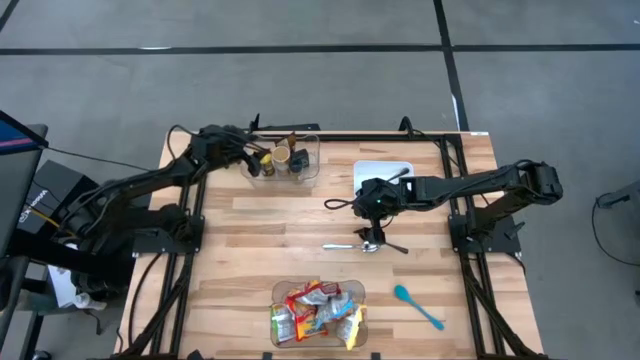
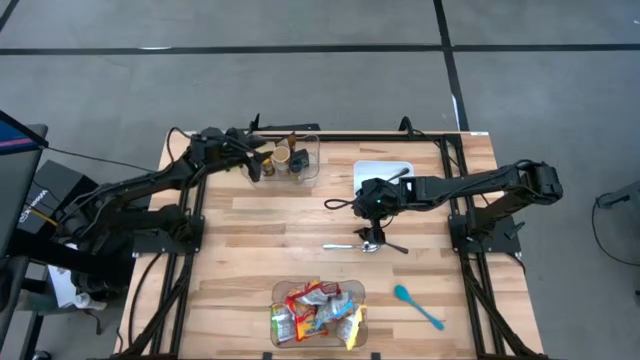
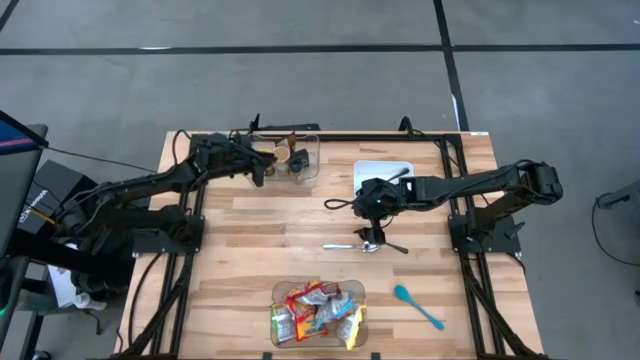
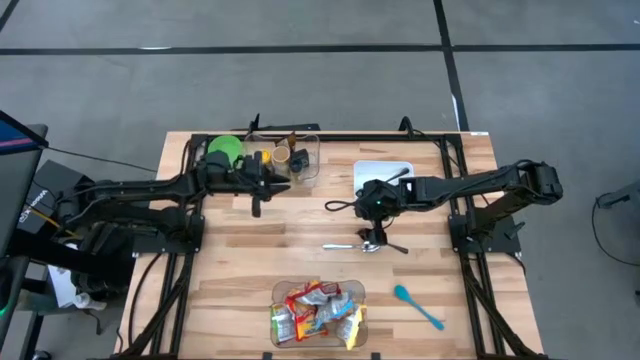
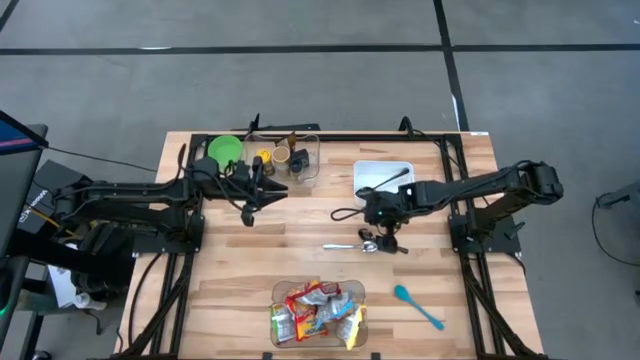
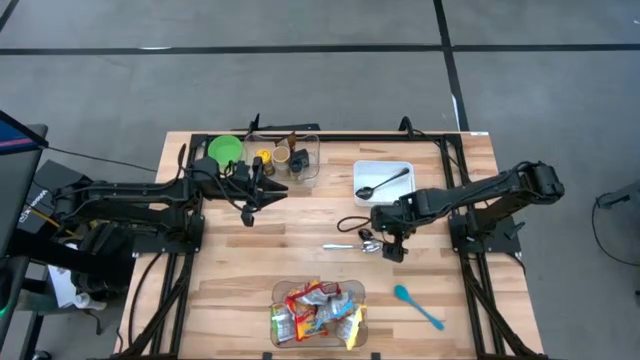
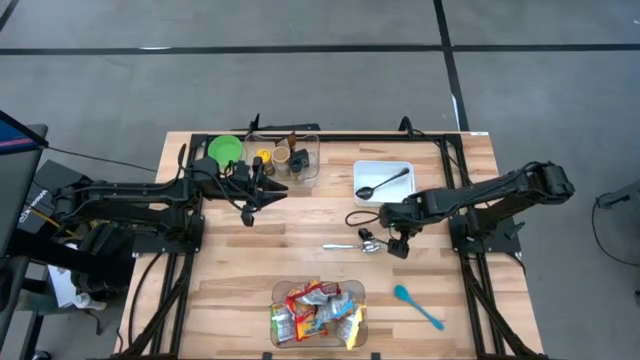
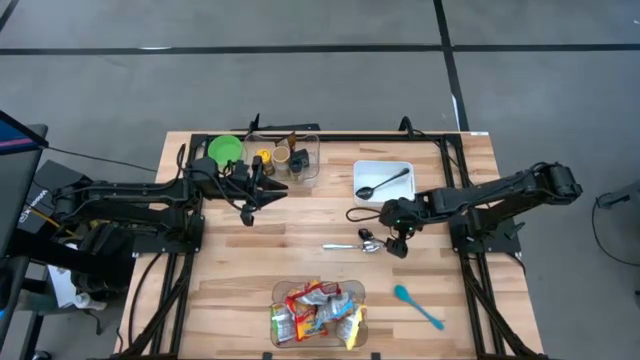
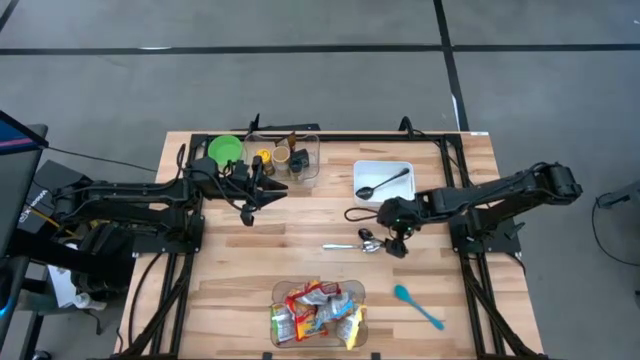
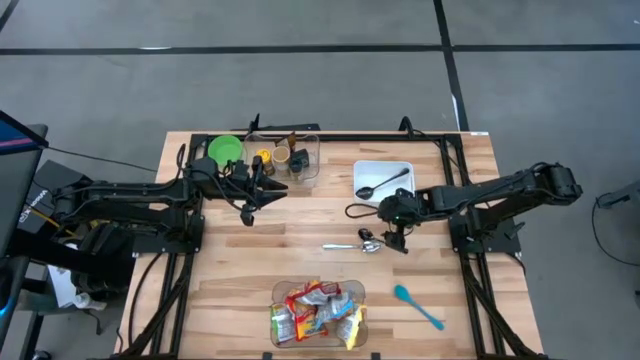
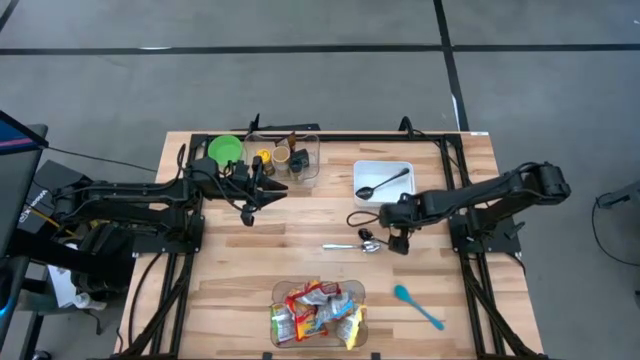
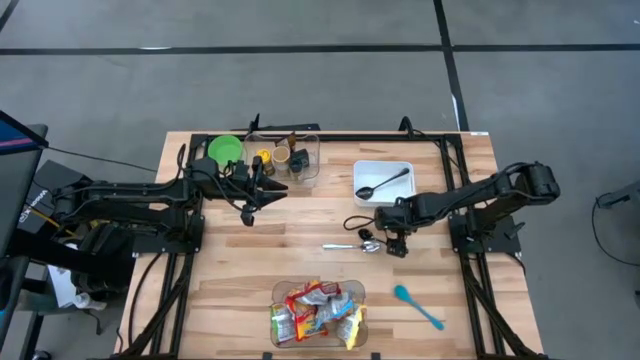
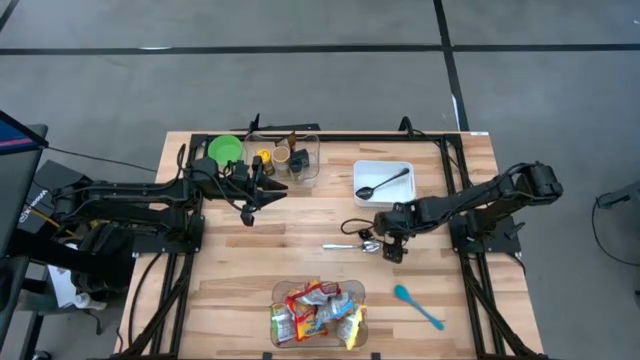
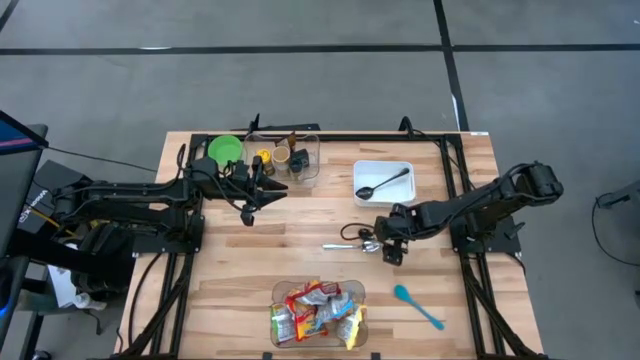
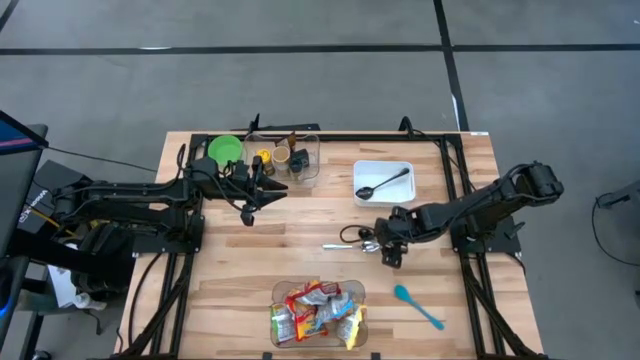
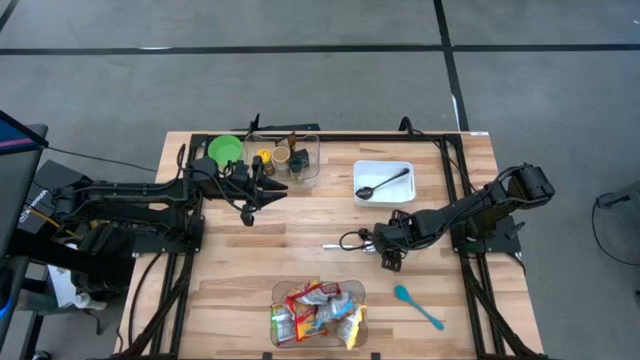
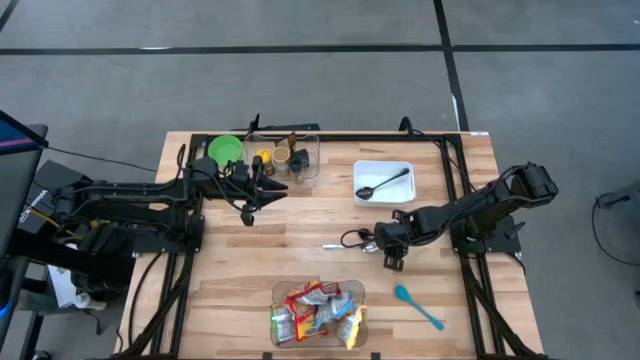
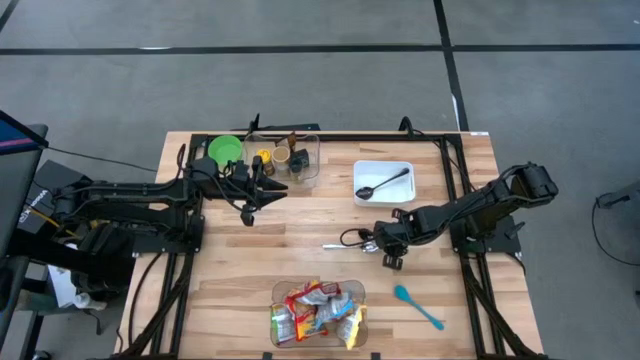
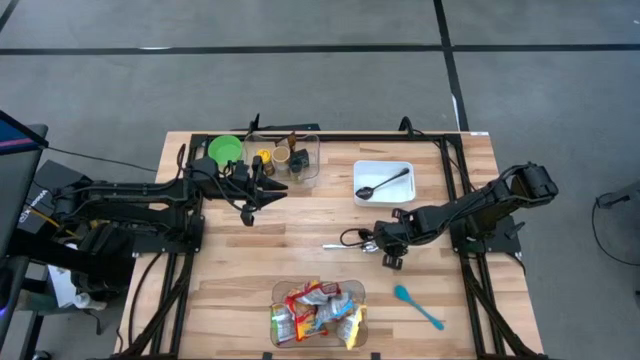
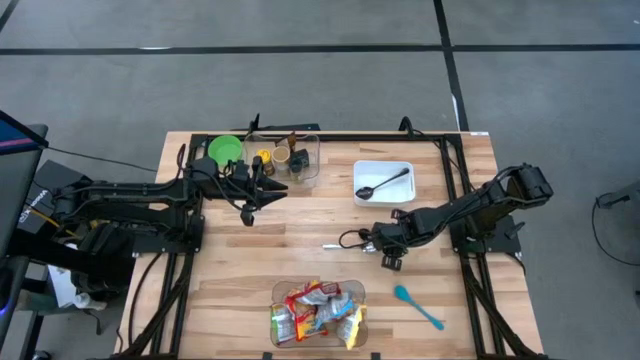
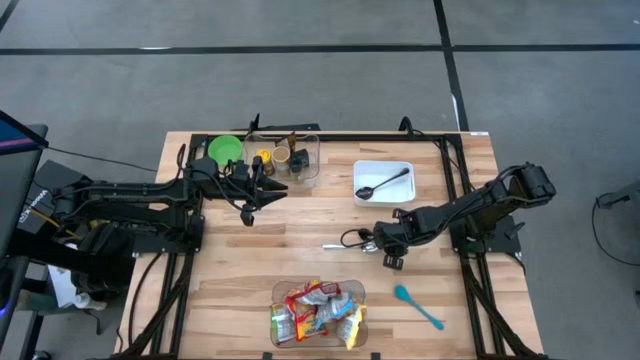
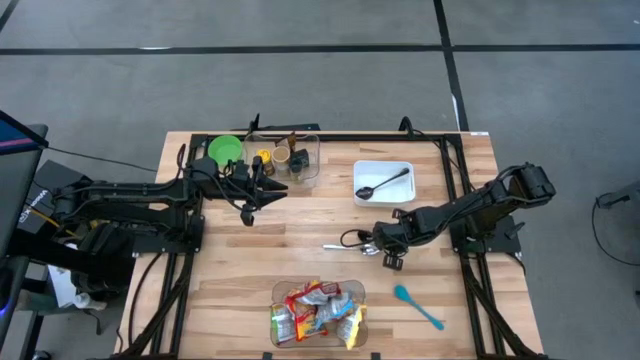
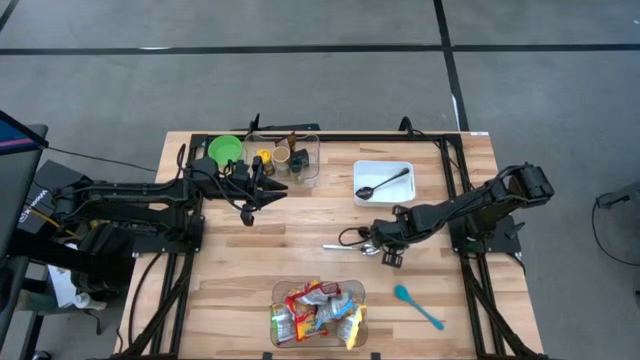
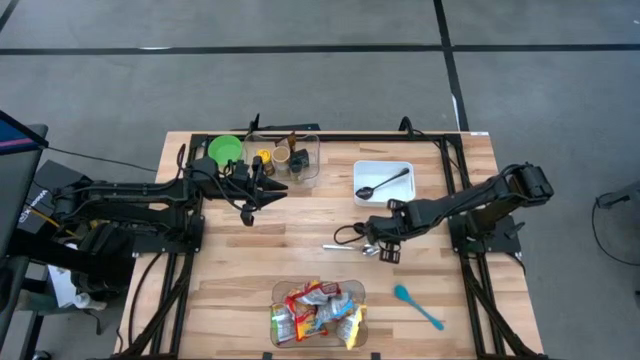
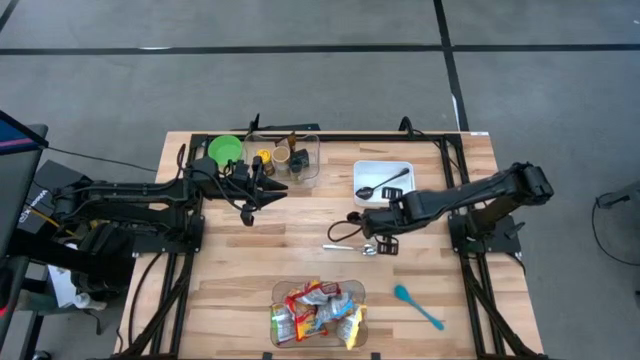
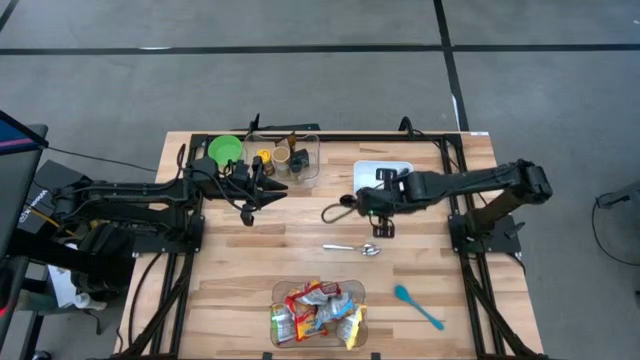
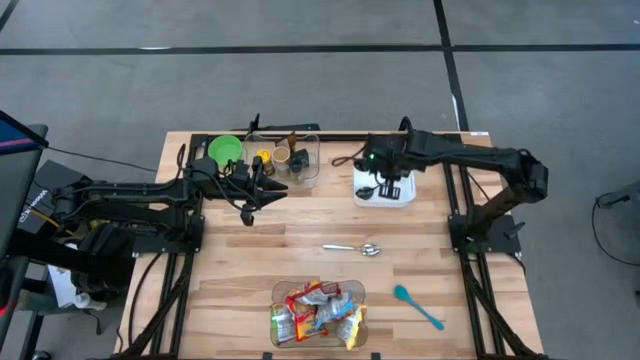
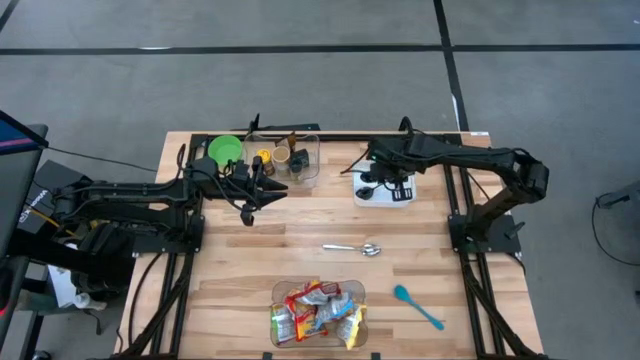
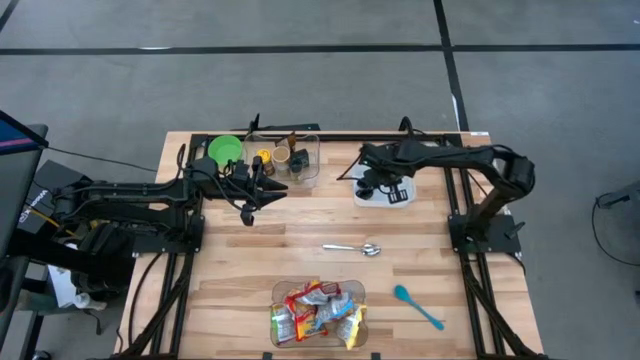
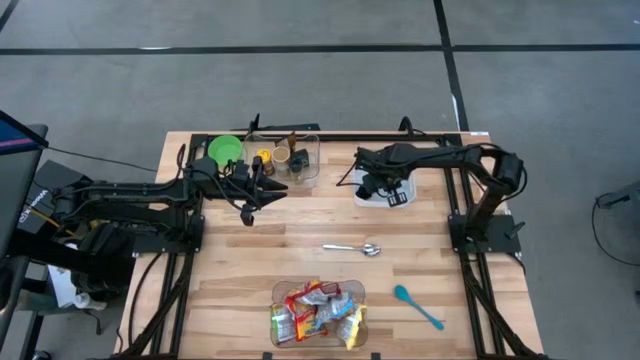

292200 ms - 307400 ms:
Task: Pick & Place Food Item
Put the black spoon into the white bin

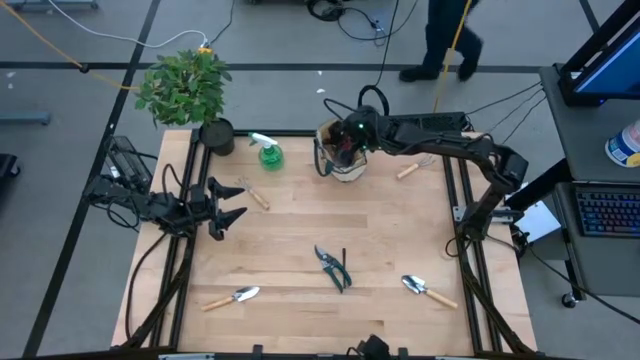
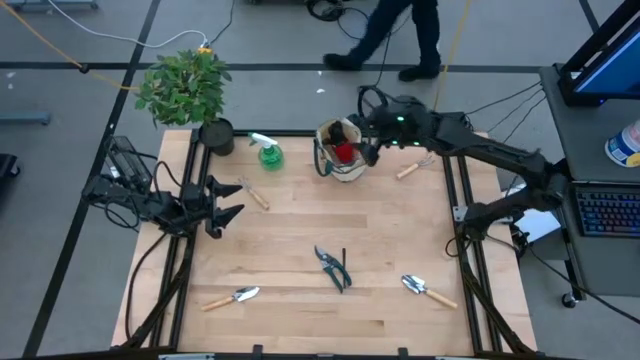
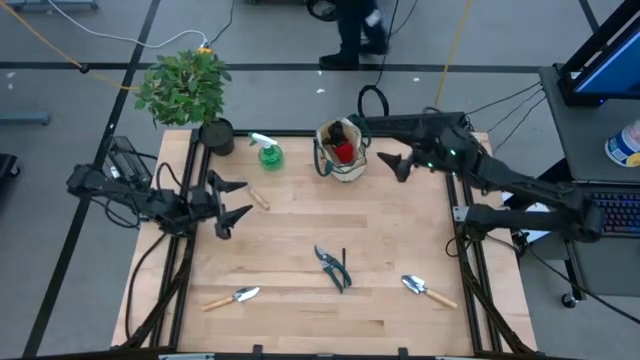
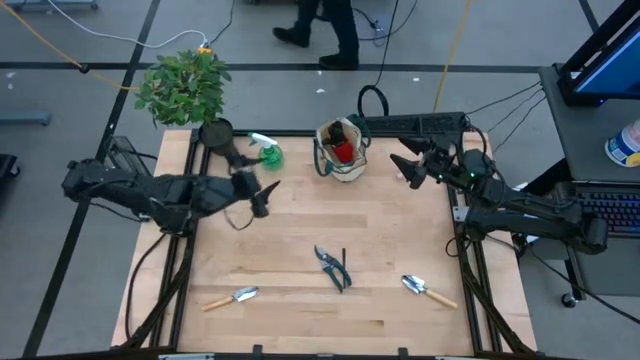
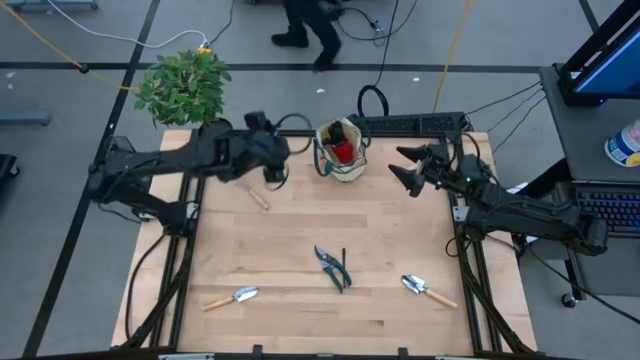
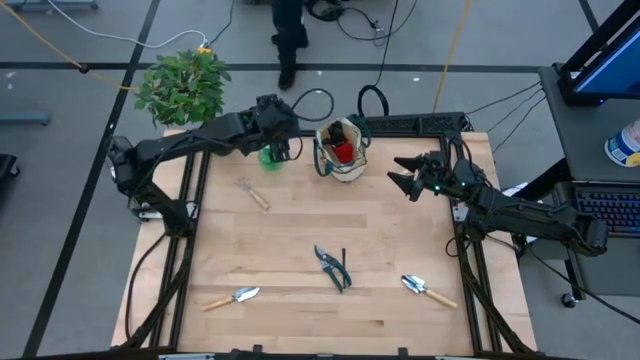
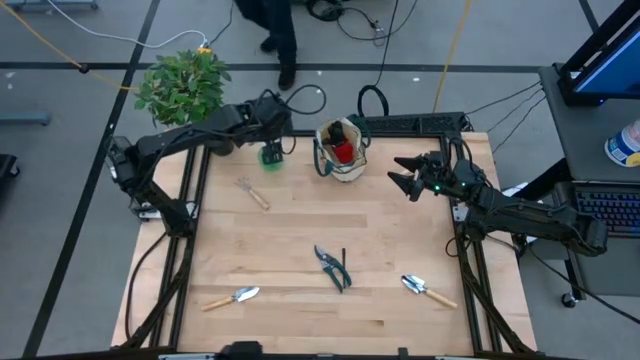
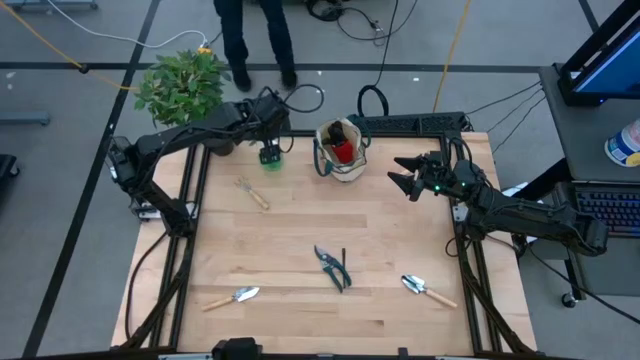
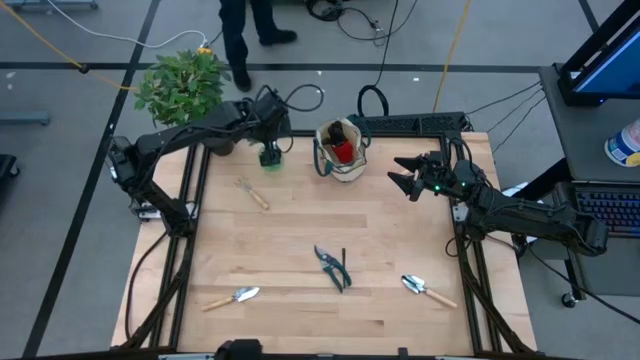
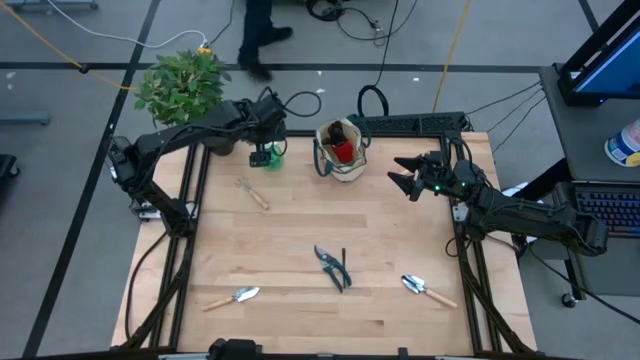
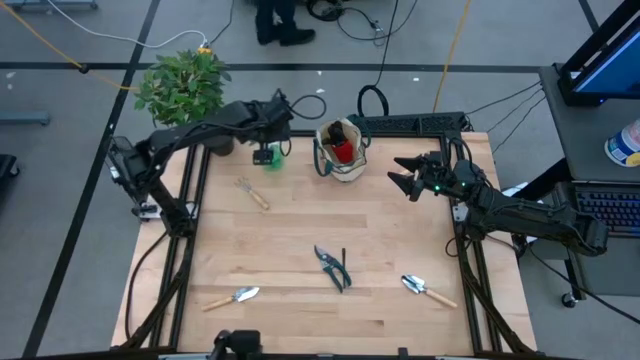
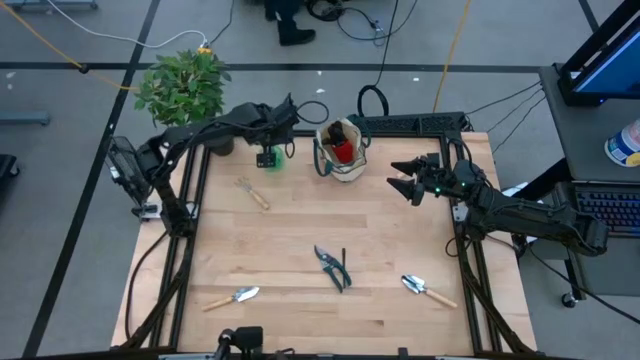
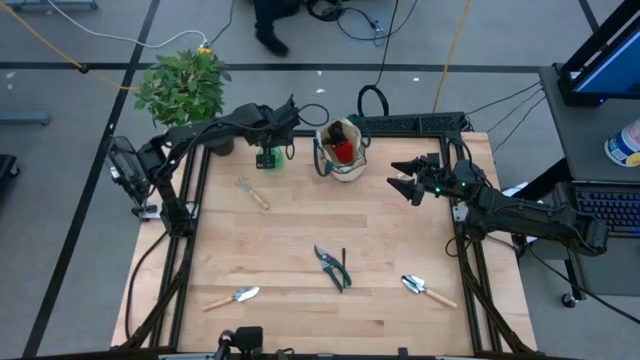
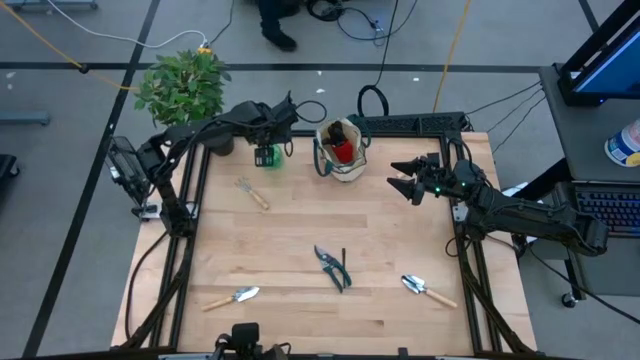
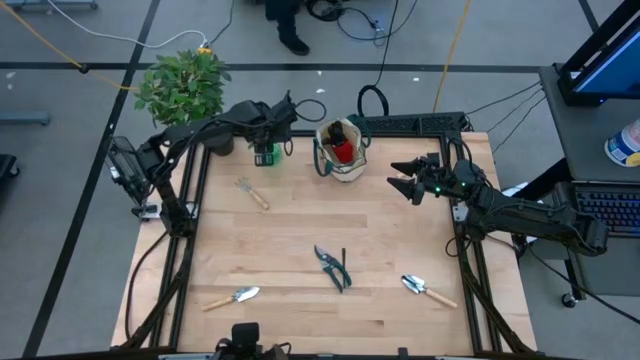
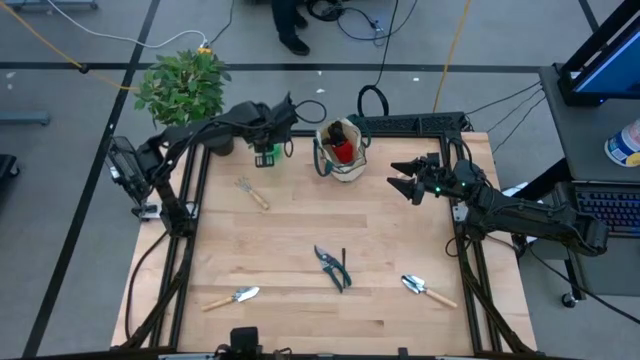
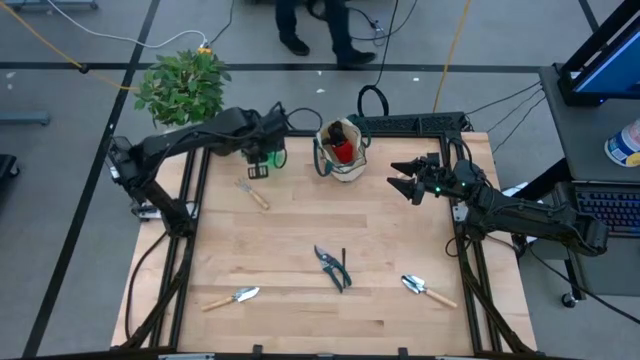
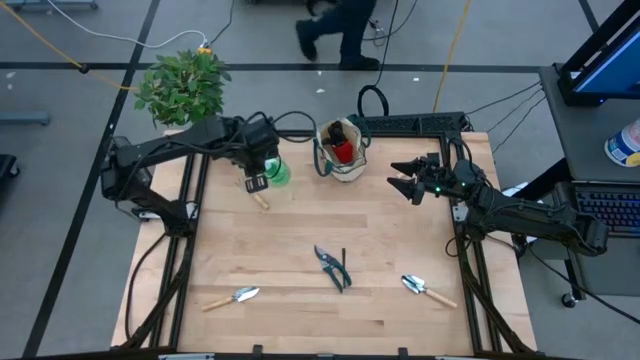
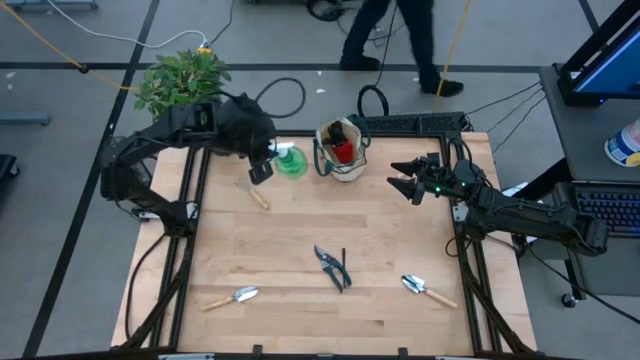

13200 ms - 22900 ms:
Task: Pick & Place Garden tools in Gardening bag
Put the spray bottle into the gardening bag
